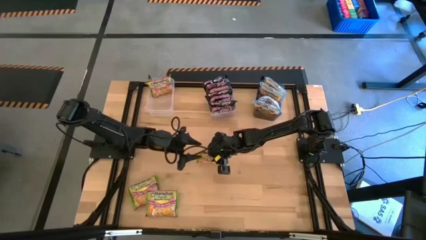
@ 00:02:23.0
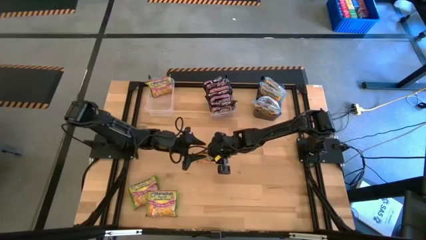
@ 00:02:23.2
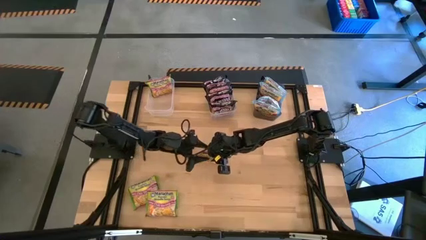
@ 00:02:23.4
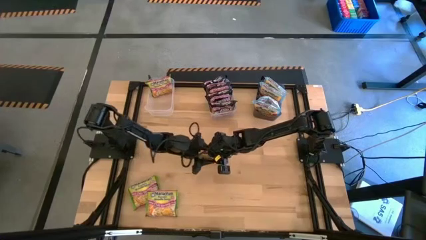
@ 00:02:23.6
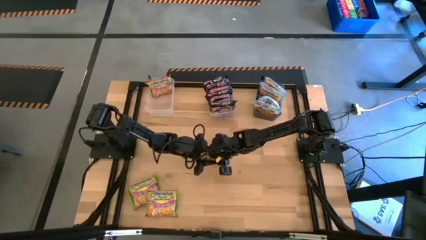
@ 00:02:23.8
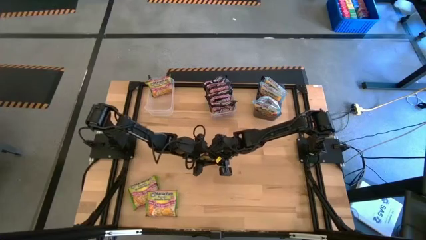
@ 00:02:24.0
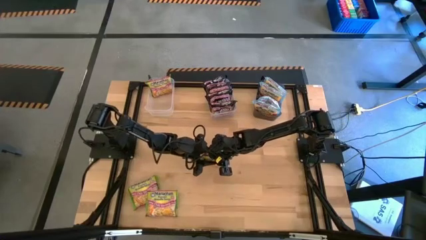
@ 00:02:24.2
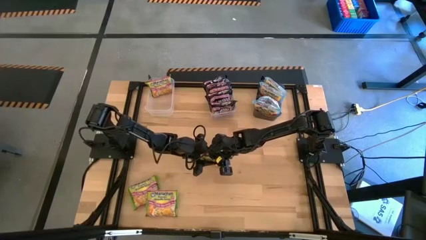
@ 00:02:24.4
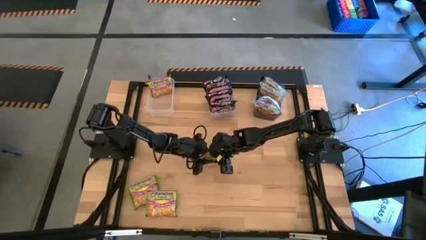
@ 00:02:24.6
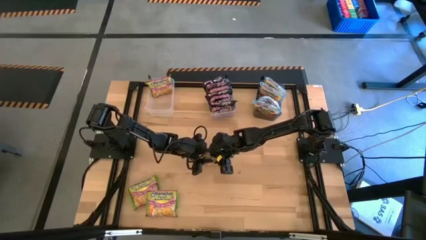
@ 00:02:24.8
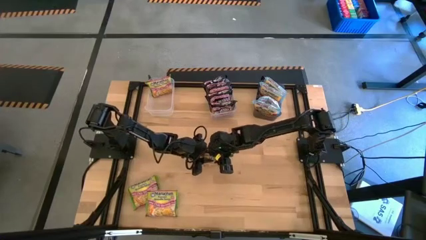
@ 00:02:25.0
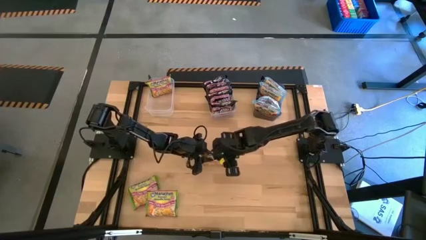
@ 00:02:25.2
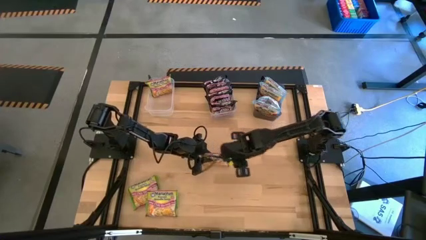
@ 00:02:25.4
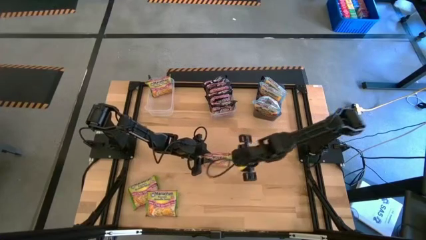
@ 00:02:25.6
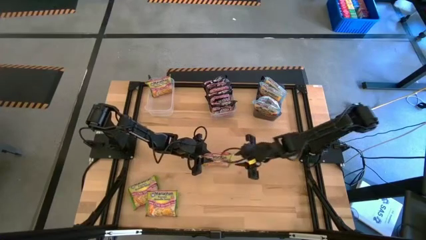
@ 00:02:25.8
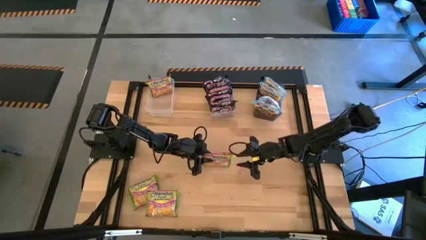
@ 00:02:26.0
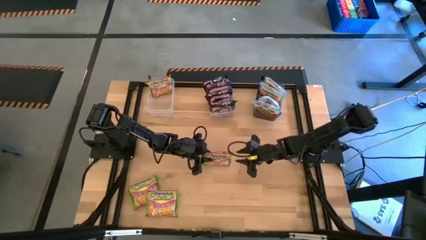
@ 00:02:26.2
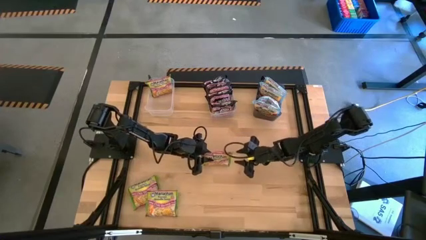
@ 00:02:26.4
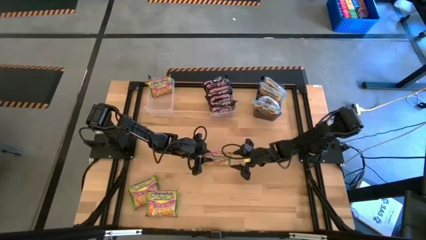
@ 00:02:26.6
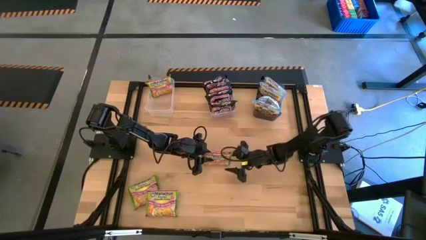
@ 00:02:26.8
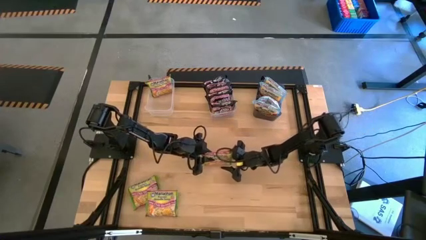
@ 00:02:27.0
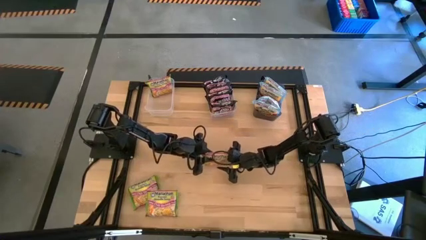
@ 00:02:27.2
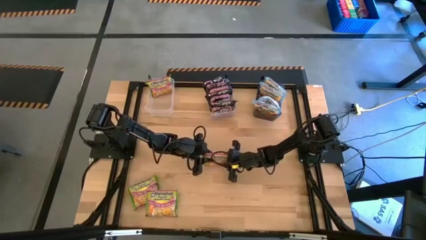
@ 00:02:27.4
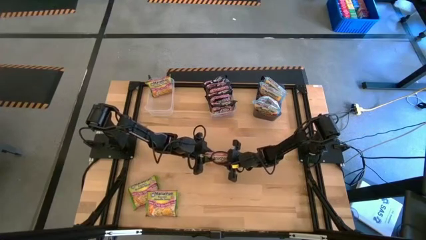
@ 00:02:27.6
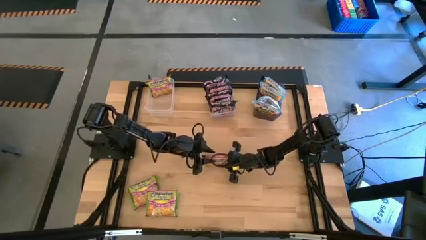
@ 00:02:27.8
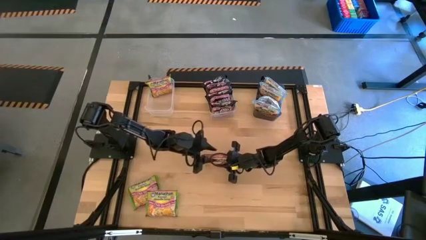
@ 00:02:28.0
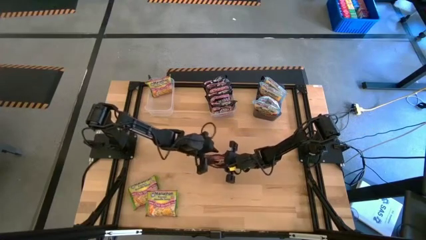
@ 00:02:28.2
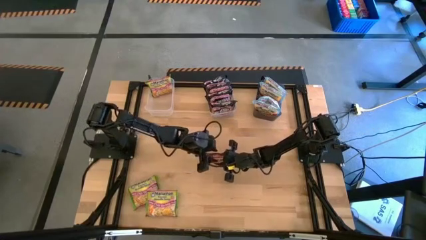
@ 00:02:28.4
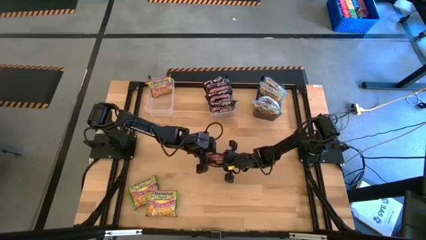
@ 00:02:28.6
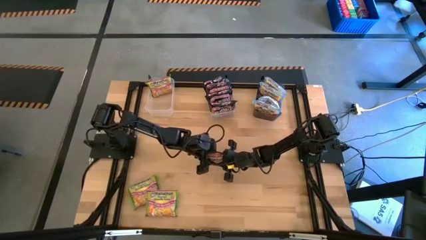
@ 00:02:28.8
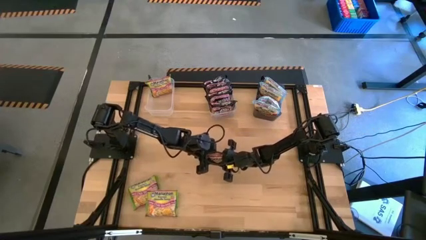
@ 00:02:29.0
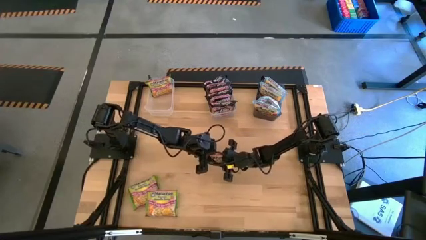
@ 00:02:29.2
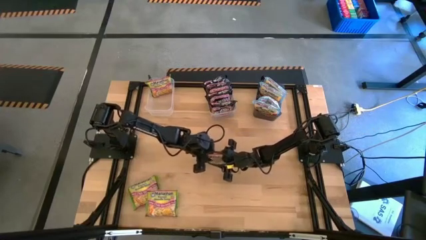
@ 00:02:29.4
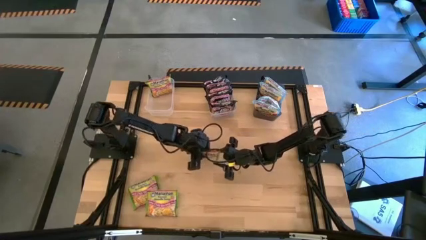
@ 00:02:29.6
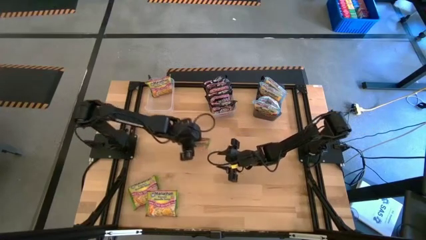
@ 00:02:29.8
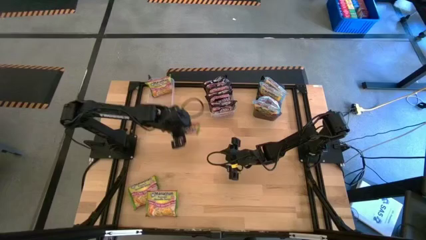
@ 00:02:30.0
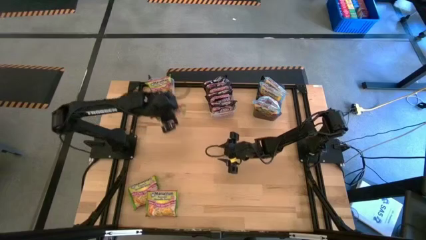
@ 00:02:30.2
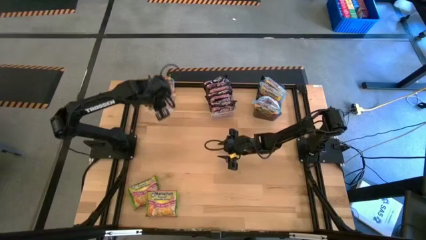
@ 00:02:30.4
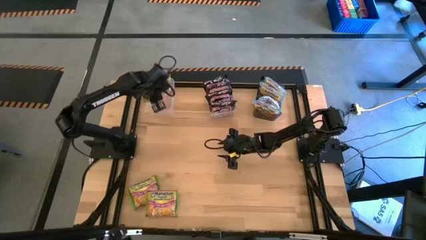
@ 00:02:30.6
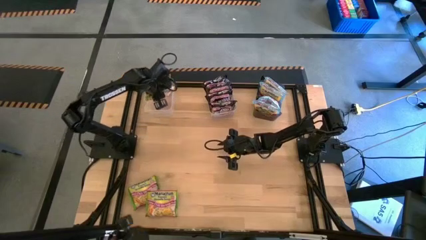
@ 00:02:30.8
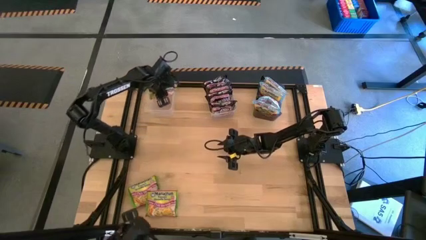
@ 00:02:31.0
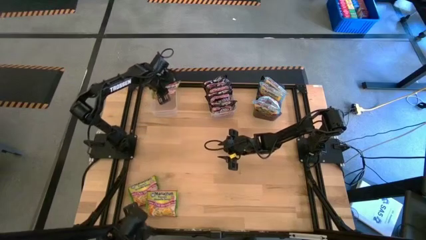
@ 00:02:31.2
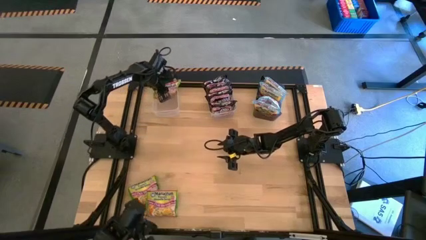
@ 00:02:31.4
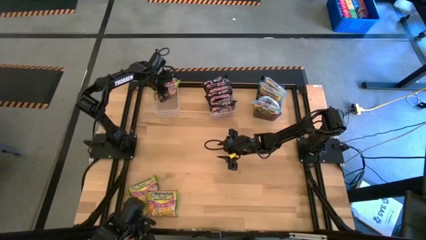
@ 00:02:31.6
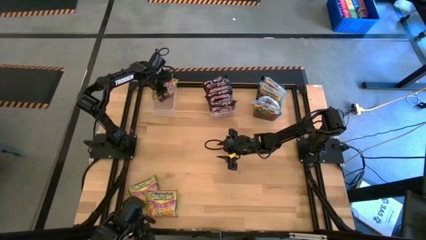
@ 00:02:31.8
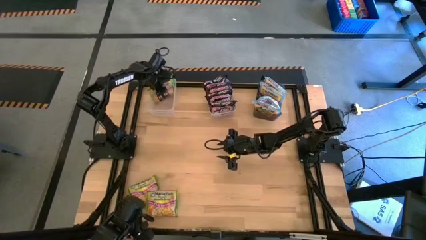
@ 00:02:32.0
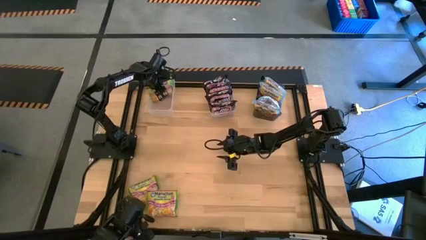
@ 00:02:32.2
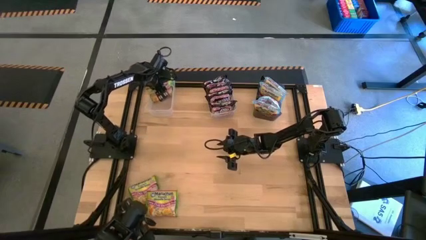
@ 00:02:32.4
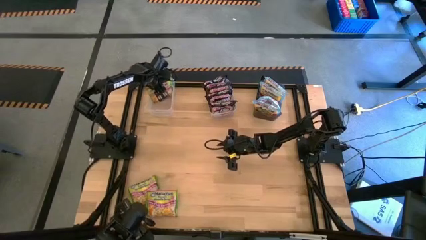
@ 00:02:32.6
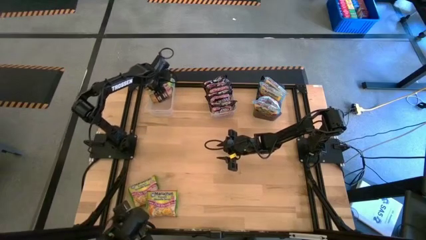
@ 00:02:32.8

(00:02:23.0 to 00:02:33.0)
Task: Sort Maruchan noodles
Put the green noodle pack into the left transparent bin

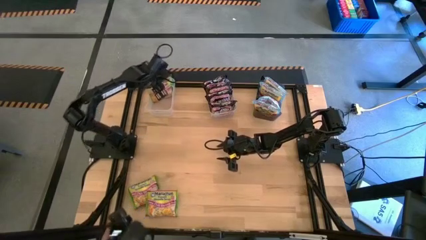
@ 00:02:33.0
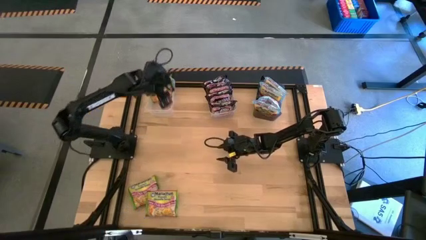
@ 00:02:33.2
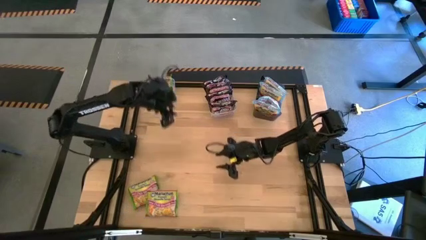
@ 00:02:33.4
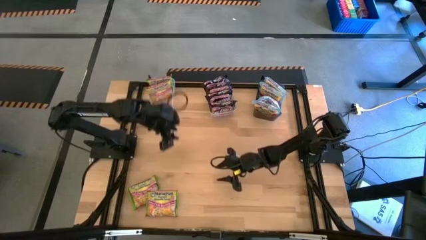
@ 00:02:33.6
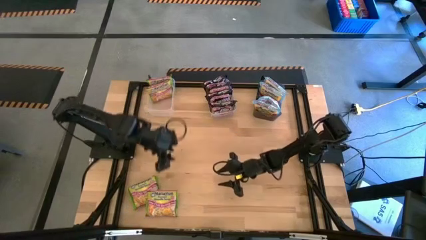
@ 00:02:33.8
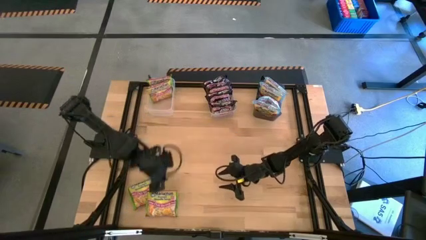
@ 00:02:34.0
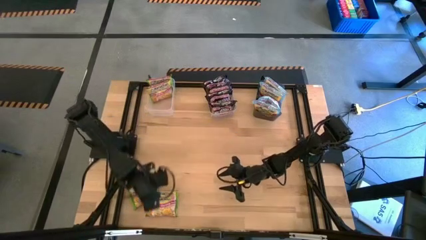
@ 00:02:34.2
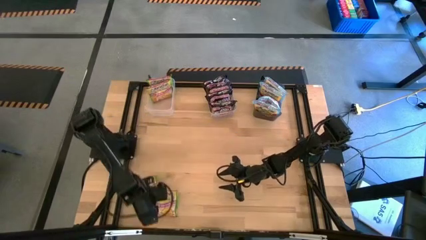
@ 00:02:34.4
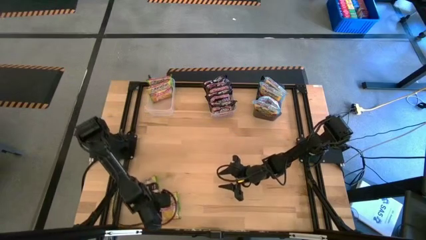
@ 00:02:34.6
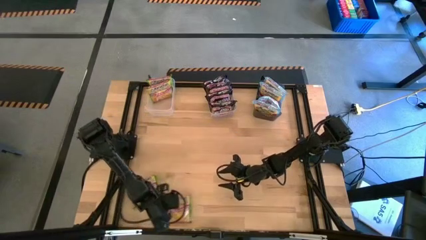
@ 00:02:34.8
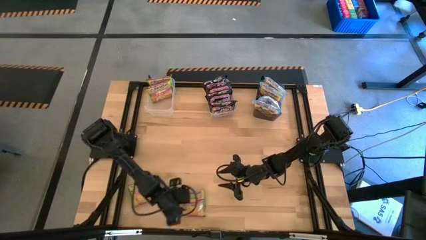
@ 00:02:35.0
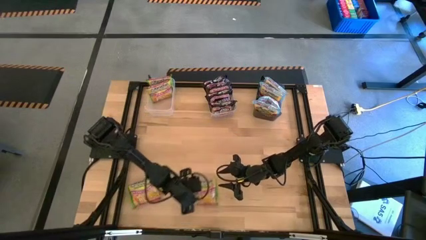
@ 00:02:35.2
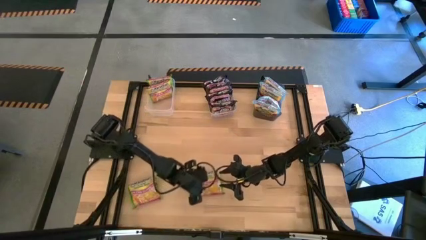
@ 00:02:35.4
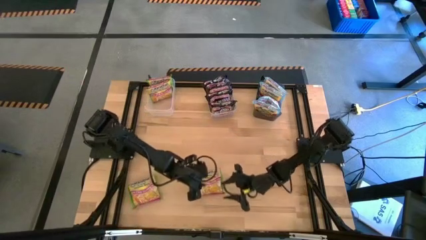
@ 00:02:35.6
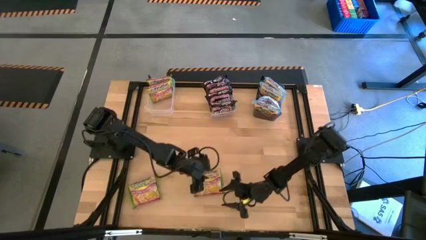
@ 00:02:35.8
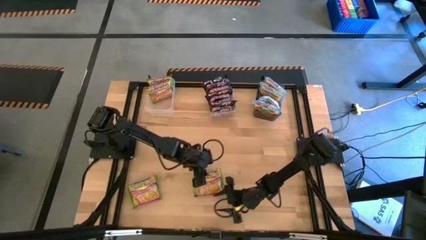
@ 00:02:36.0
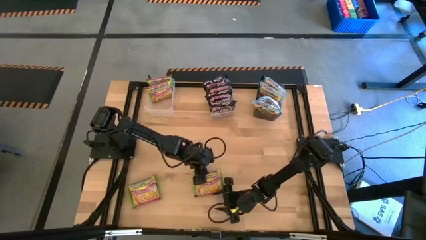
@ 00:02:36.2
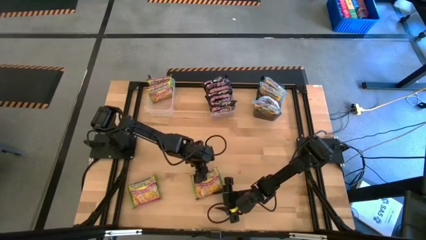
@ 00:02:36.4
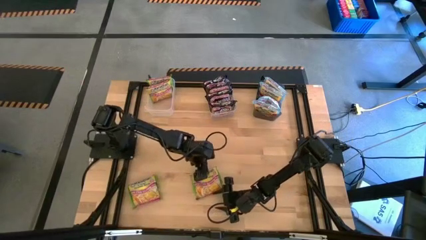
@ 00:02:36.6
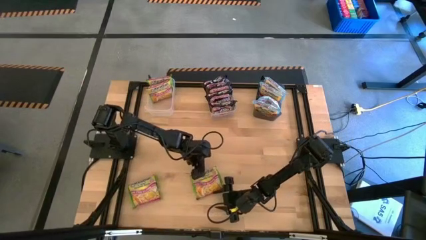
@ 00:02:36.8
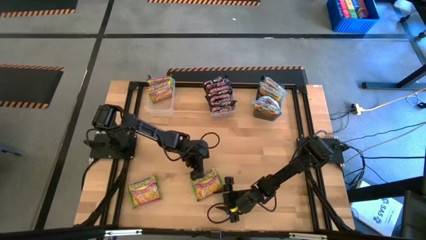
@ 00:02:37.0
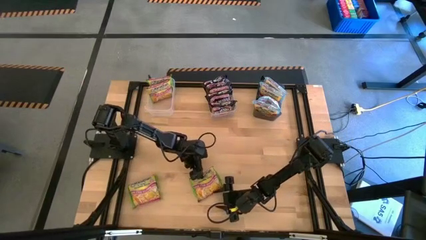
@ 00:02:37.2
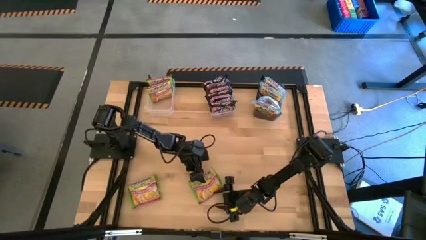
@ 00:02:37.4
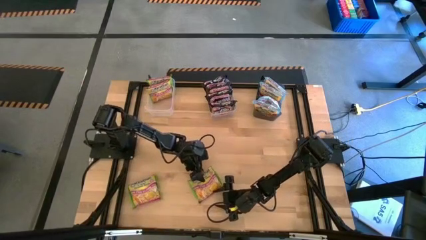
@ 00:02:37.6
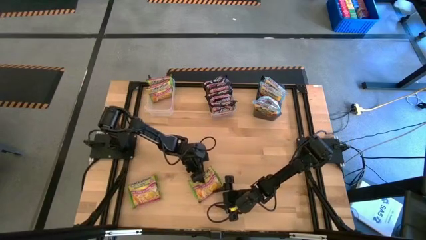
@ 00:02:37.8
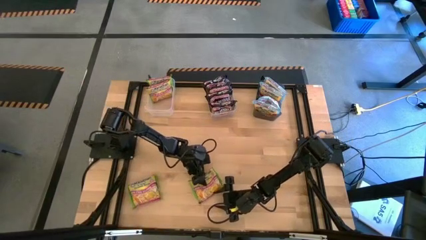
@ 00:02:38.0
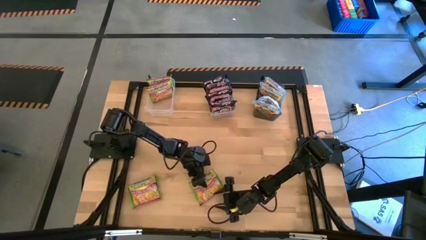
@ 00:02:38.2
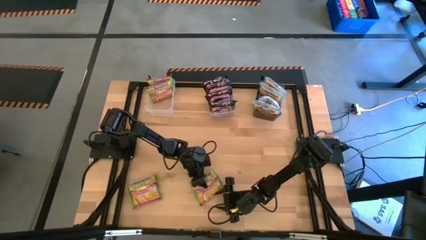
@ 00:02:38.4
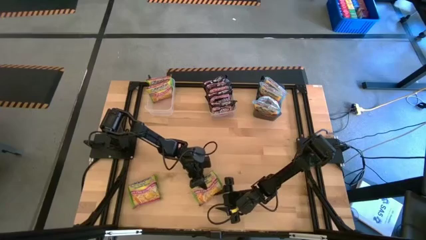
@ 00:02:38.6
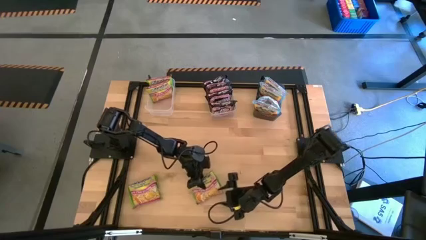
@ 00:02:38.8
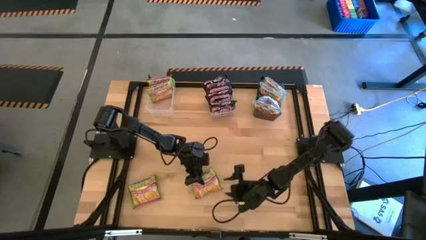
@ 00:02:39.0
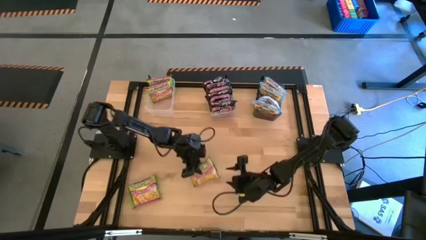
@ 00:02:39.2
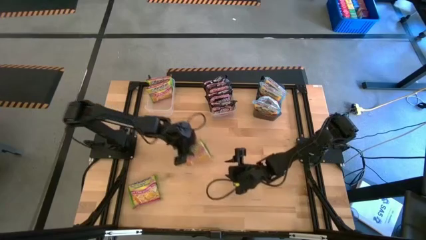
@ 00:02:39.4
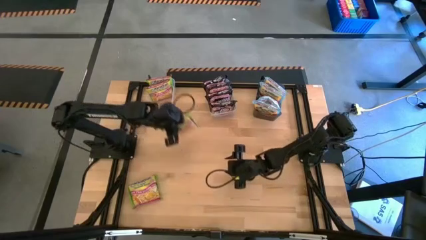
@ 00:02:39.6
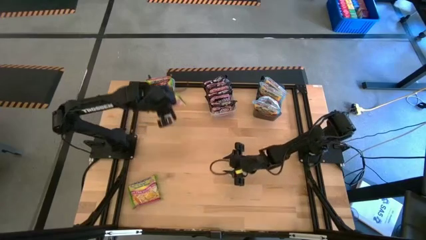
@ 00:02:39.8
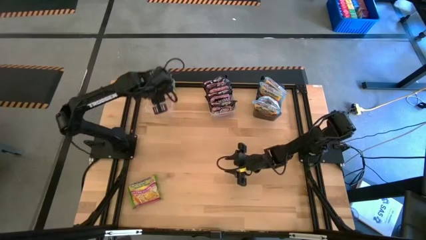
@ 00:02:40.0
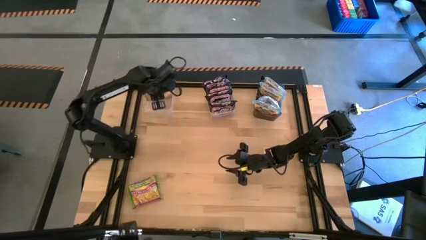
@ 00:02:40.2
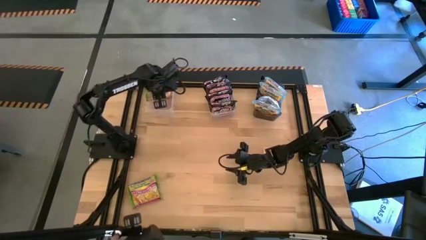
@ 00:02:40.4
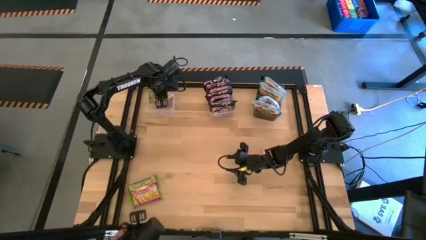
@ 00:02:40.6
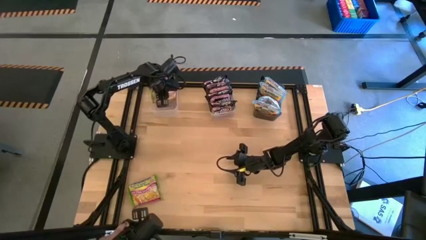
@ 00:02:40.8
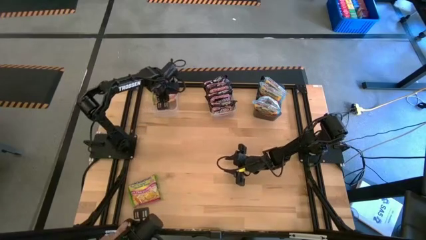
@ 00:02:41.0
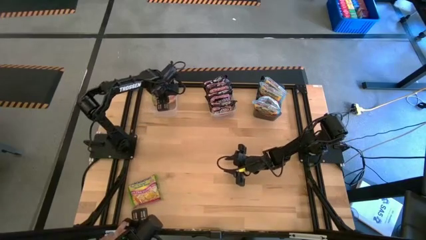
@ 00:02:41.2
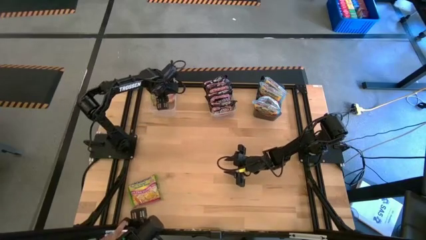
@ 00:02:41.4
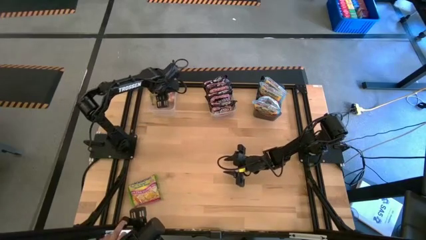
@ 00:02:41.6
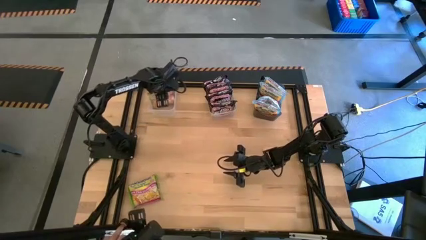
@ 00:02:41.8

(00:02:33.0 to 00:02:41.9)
Put the green noodle pack into the left transparent bin
